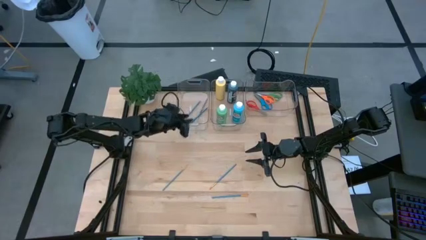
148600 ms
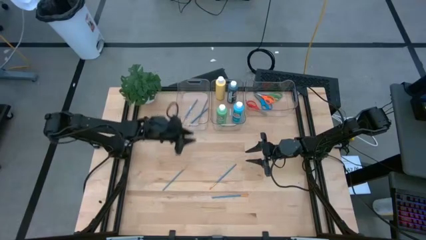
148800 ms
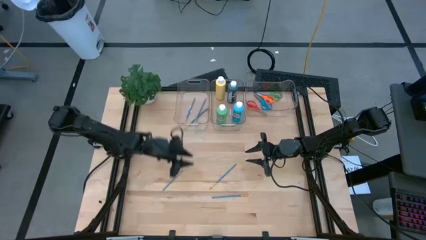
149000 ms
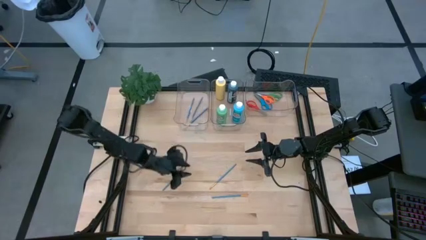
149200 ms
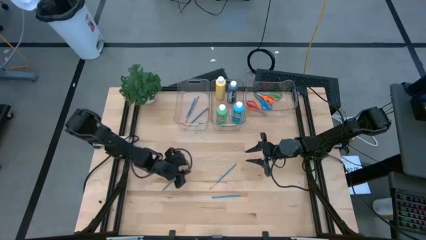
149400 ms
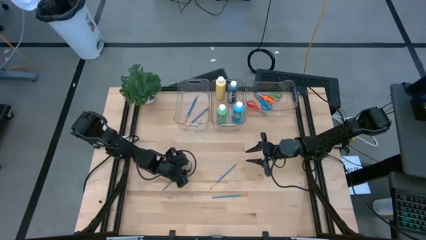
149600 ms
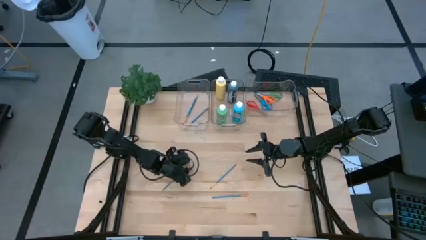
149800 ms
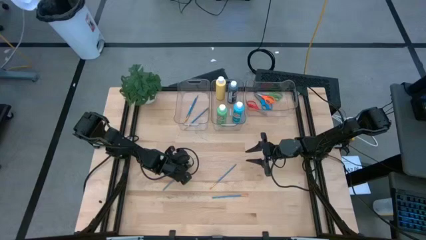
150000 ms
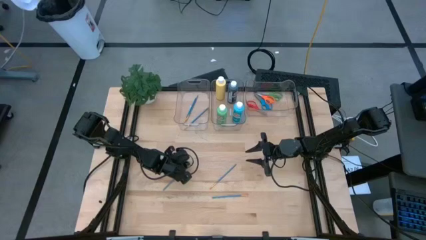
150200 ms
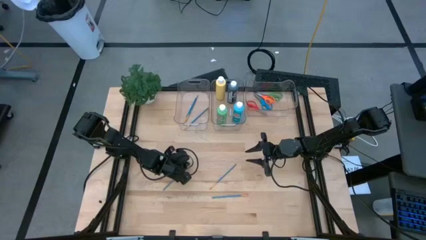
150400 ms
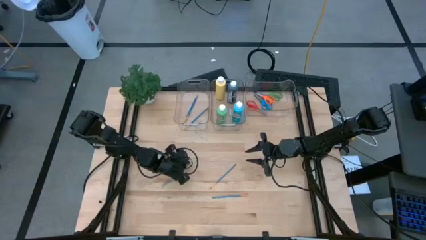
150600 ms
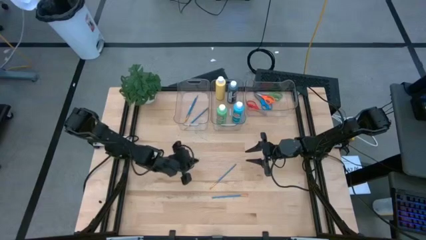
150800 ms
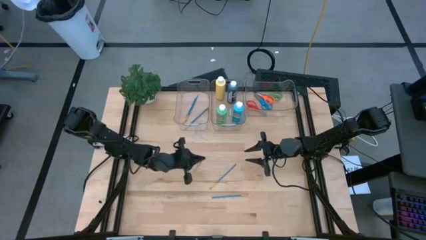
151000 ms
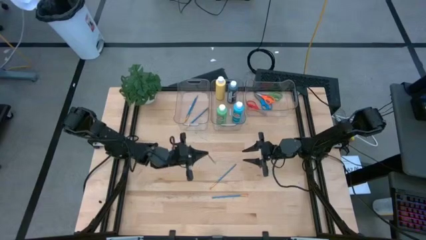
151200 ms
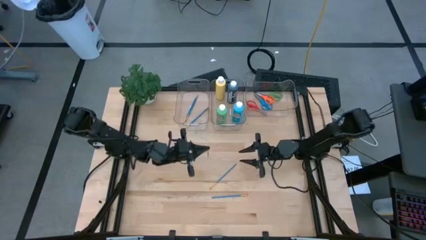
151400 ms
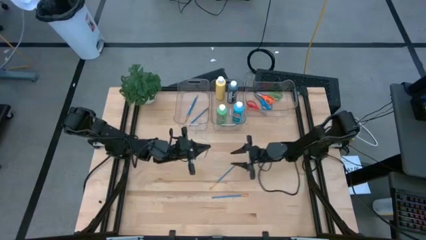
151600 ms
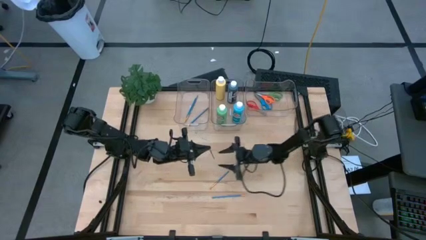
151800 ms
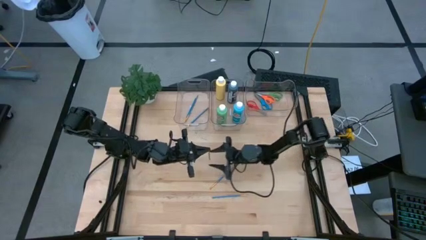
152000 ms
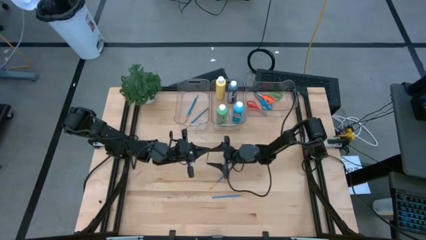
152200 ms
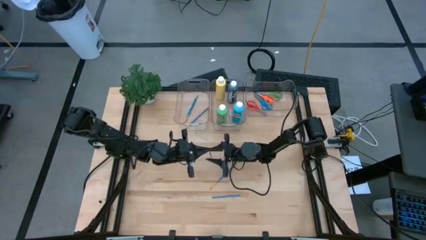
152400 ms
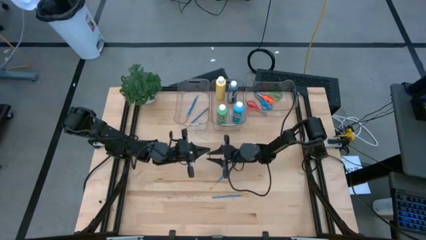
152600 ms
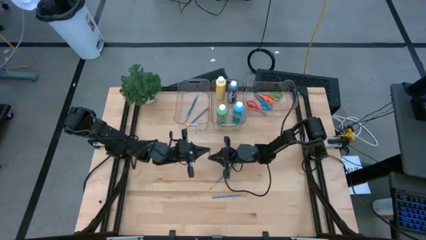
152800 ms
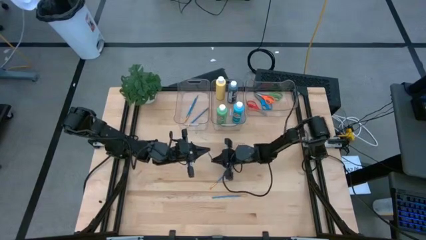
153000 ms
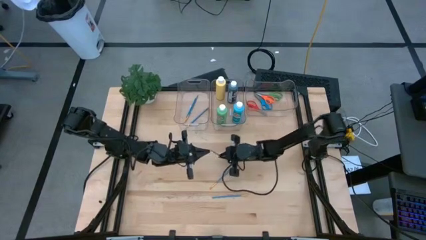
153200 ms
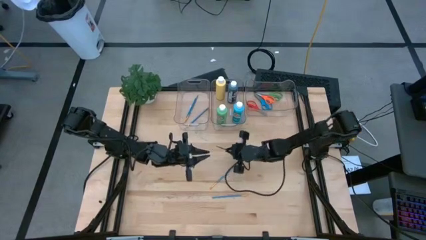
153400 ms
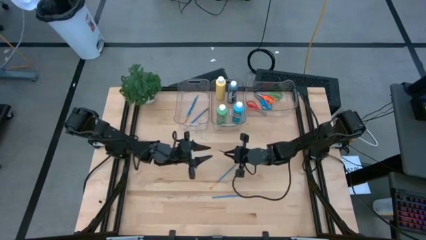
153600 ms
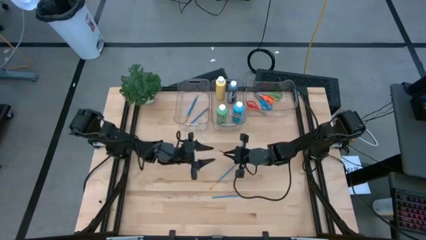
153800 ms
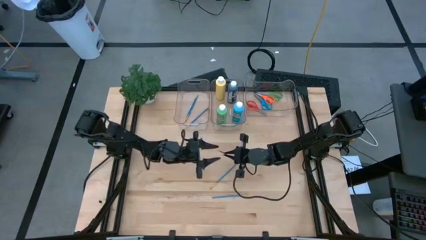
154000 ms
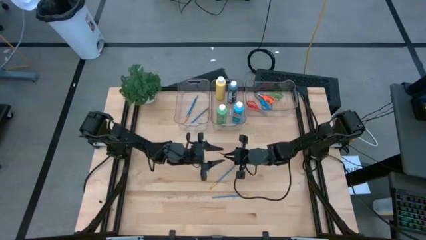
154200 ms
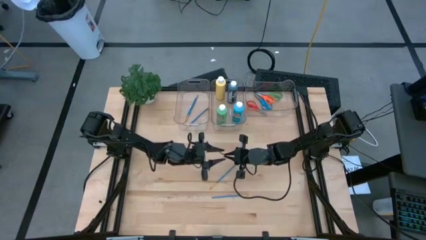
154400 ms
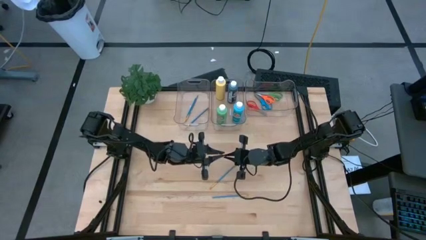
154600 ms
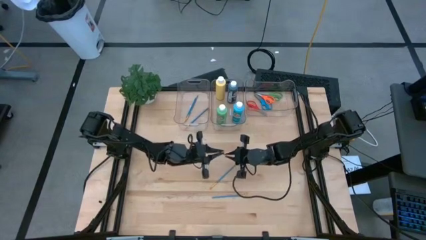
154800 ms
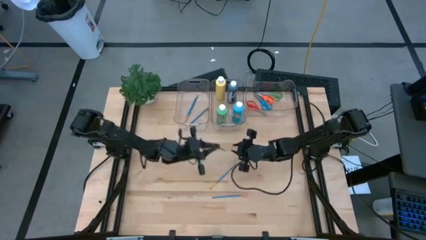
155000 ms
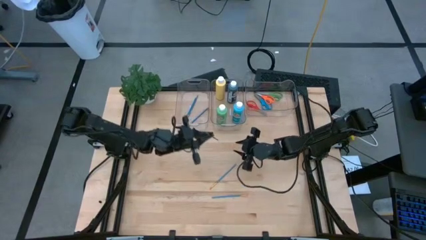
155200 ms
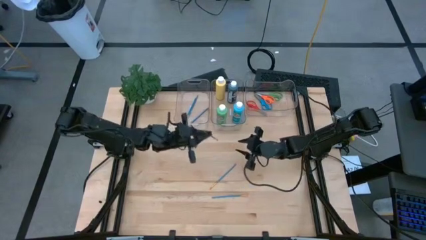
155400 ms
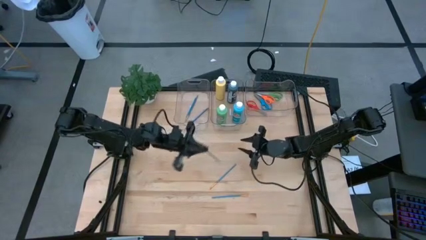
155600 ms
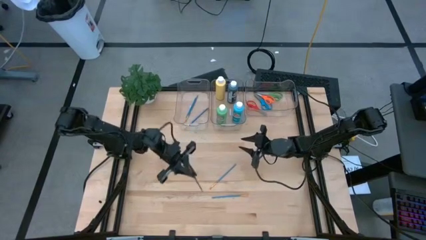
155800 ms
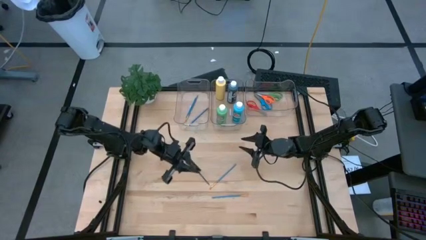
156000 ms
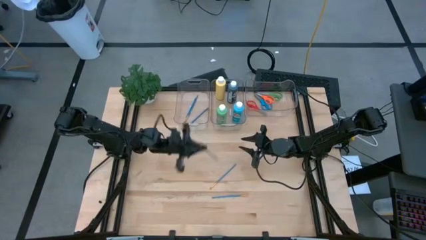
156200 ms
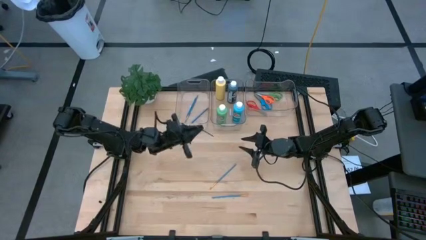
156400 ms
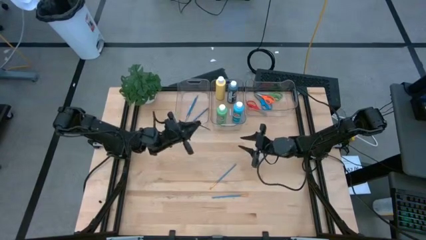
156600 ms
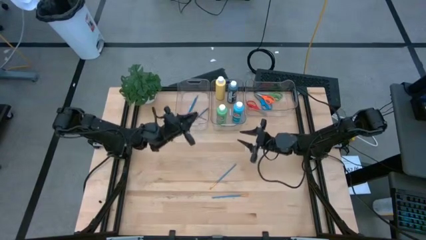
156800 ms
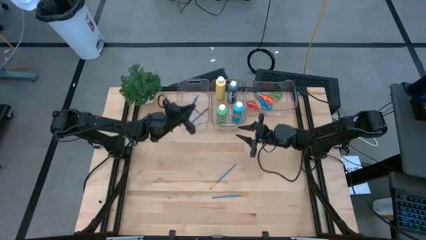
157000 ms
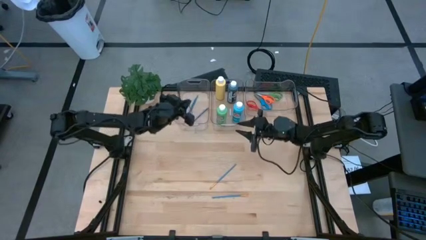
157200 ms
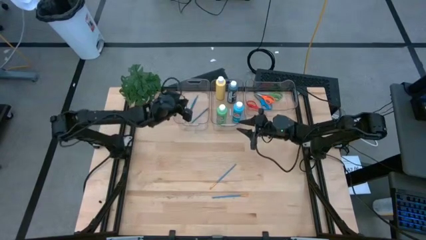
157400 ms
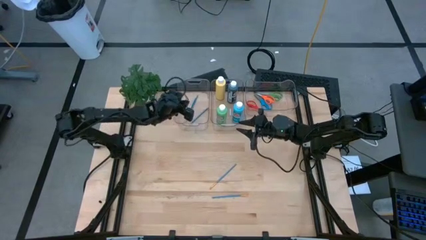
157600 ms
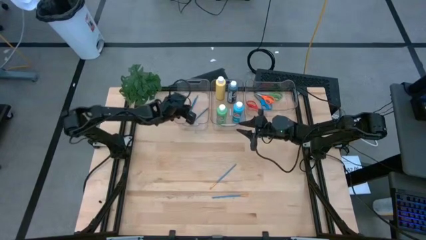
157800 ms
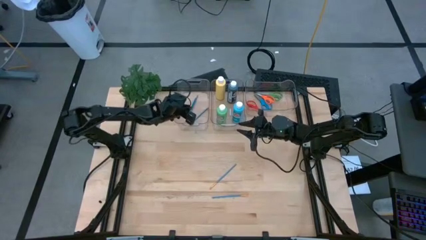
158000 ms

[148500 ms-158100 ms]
Task: Pick & Place Paint Supplies
Put the blue paint brush into the left transparent bin

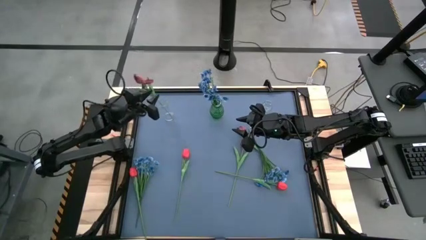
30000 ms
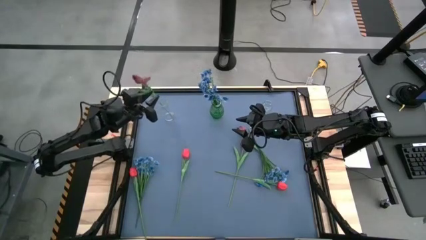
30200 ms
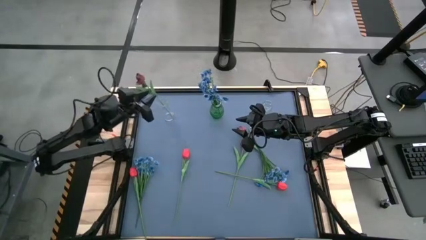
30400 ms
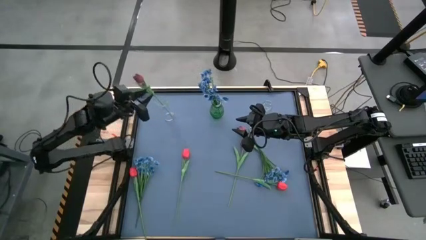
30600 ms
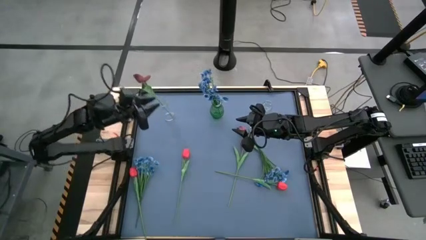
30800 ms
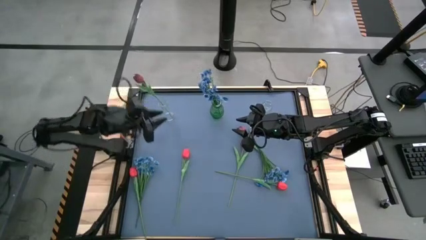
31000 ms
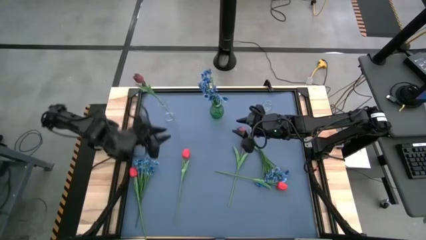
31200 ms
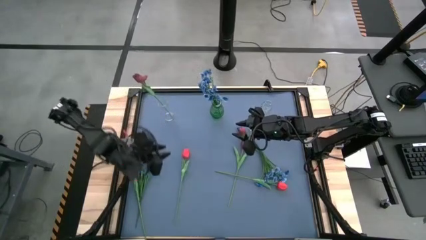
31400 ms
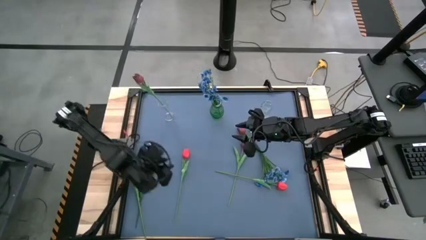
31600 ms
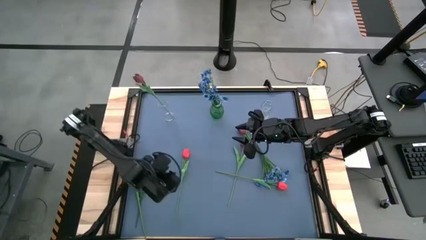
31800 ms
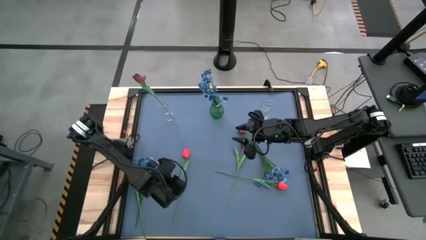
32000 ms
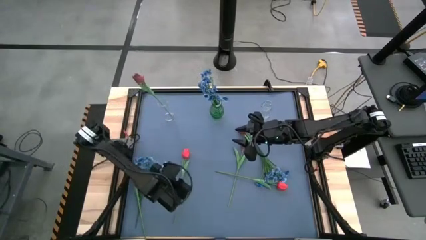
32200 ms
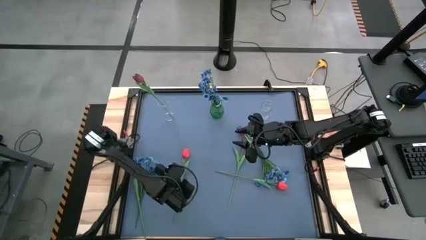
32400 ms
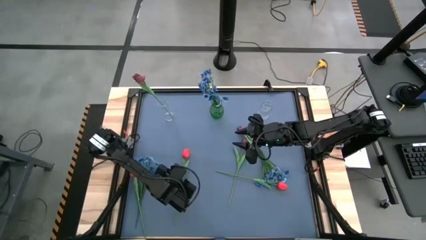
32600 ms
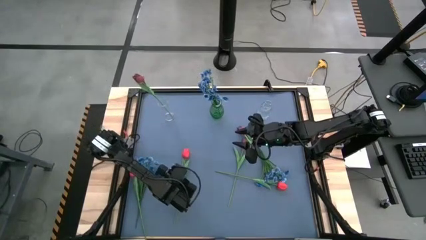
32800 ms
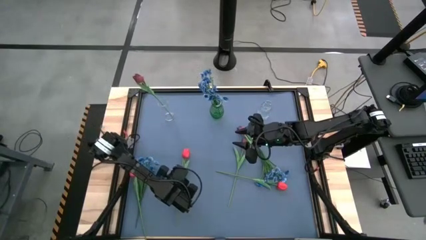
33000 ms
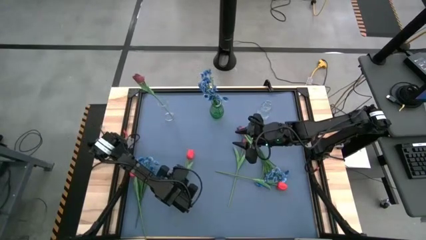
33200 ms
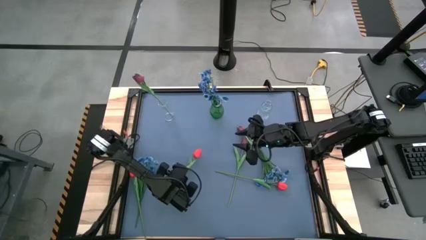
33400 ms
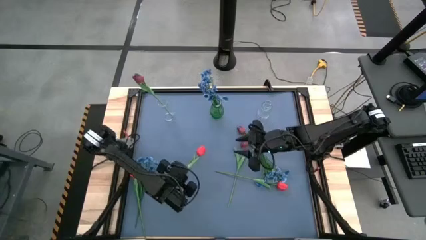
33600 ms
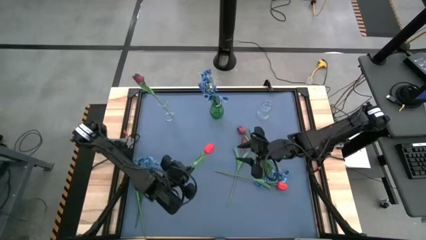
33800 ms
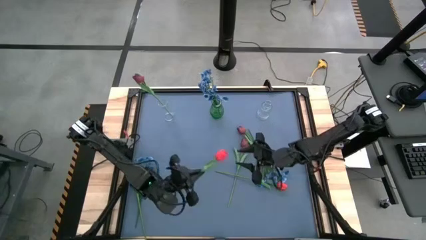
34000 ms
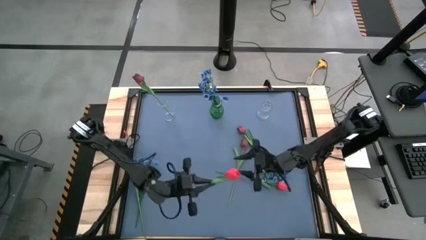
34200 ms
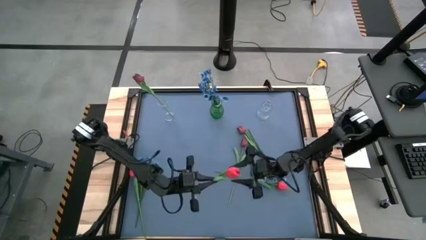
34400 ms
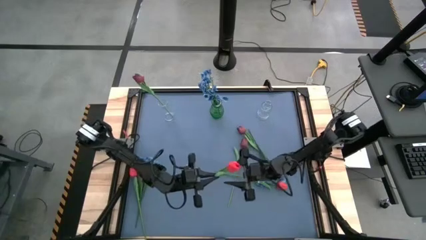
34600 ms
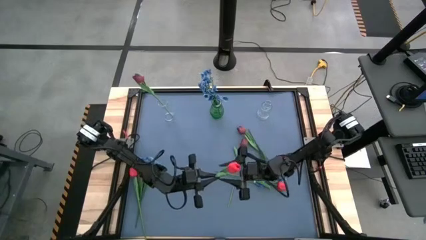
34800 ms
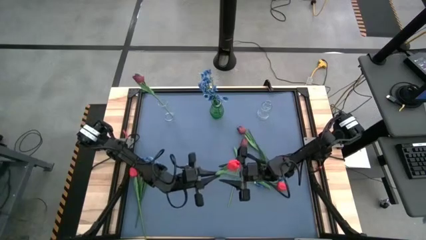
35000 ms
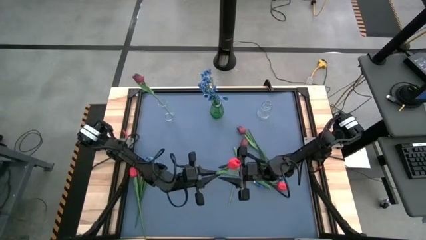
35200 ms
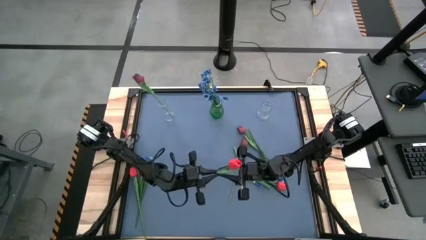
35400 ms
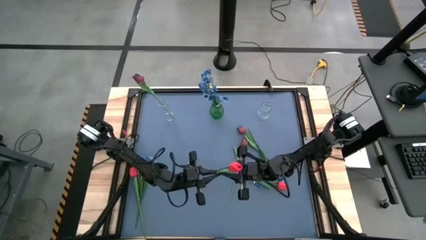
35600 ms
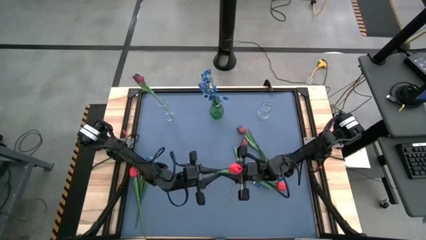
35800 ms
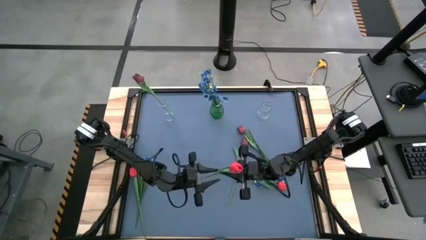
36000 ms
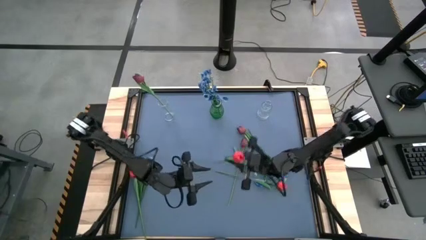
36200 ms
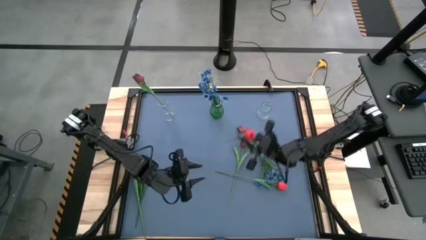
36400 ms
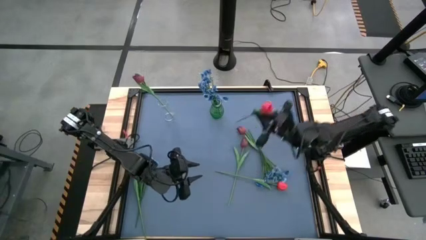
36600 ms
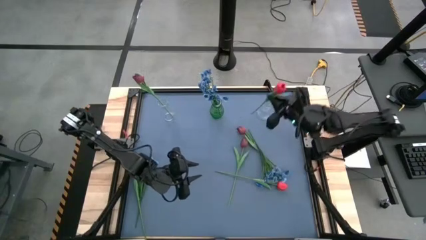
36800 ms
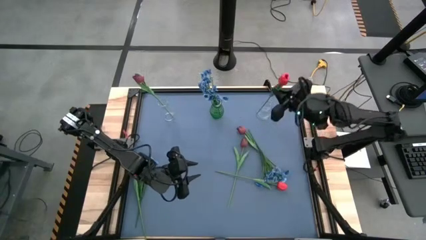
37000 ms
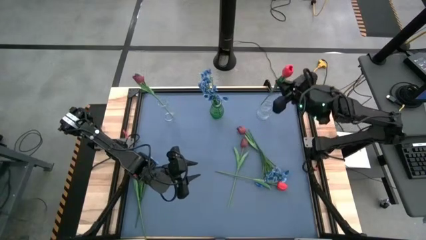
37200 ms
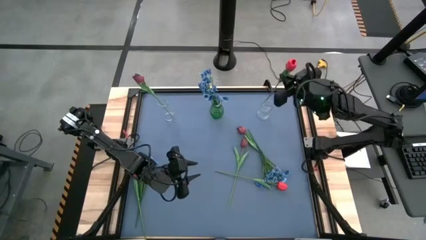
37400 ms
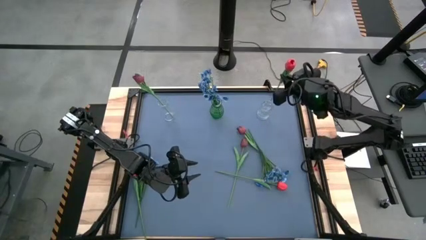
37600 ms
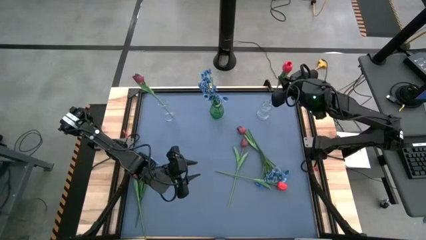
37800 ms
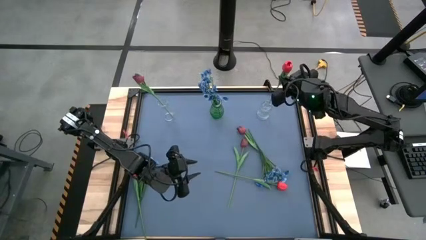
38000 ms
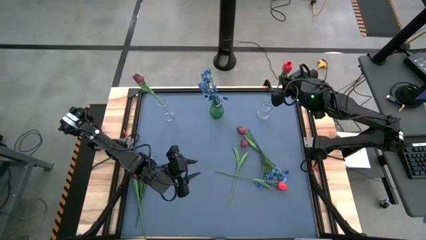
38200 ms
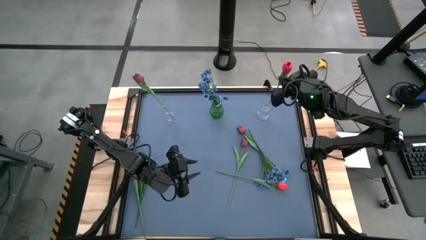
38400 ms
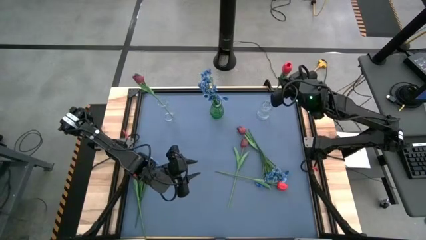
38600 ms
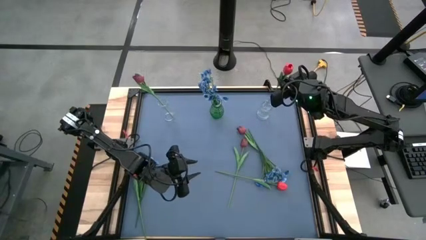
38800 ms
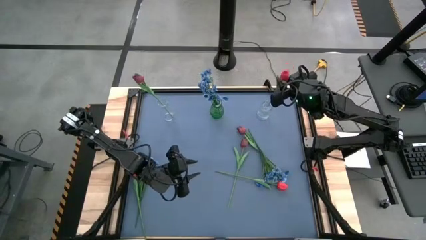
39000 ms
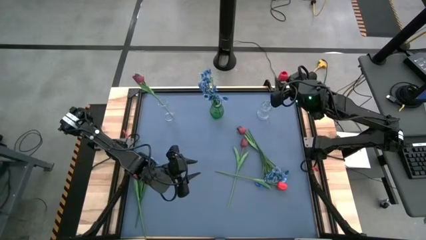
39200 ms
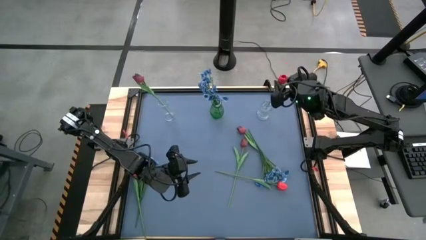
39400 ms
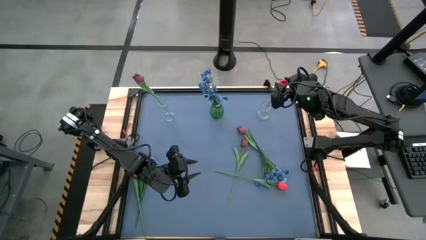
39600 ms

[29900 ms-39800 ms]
Task: Sort flowers into vase by color
Put the center pink flower into the right transparent vase
